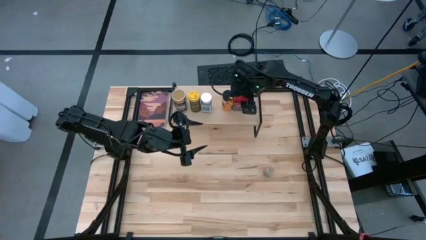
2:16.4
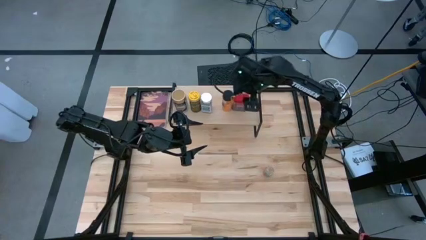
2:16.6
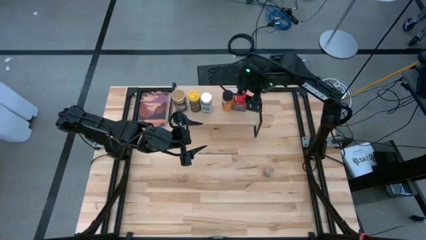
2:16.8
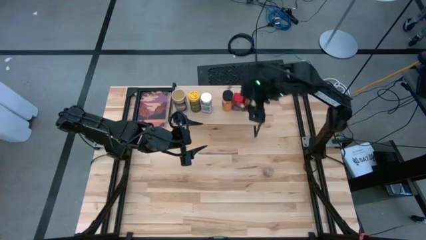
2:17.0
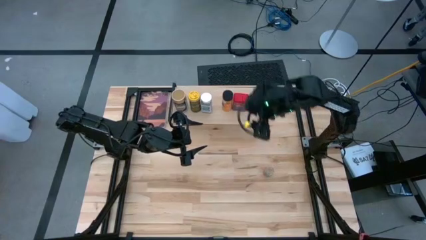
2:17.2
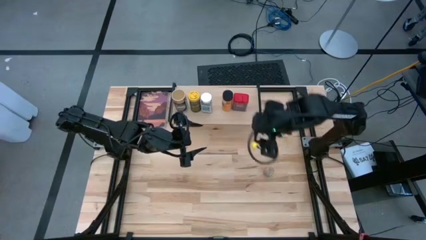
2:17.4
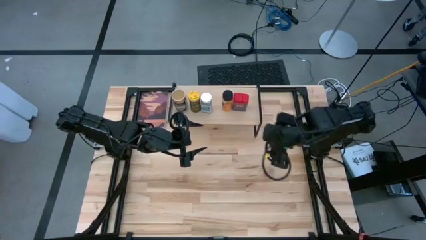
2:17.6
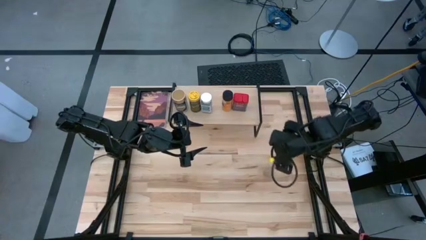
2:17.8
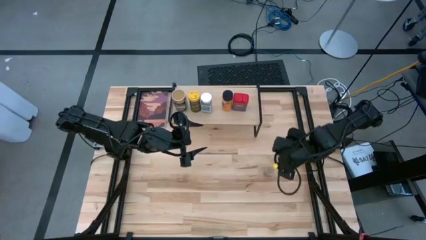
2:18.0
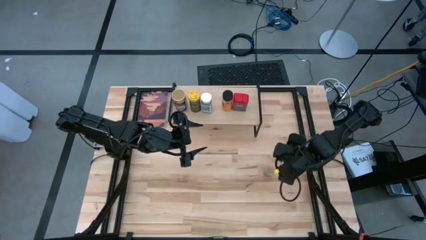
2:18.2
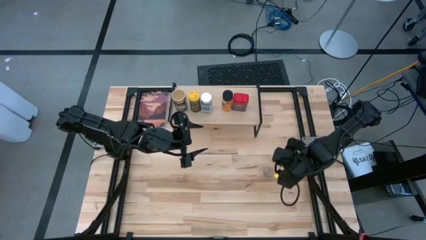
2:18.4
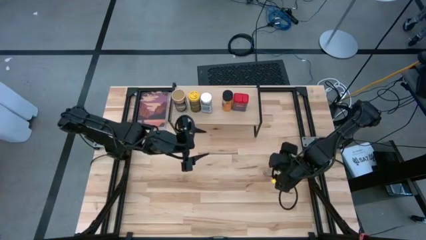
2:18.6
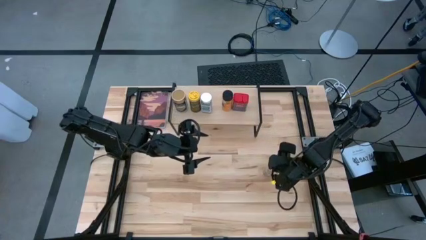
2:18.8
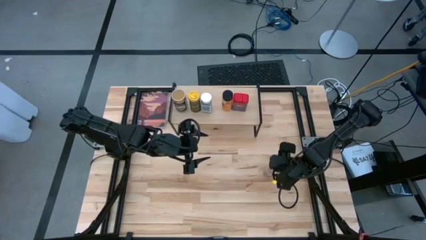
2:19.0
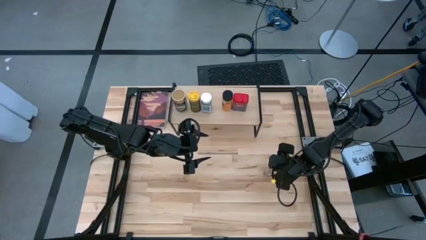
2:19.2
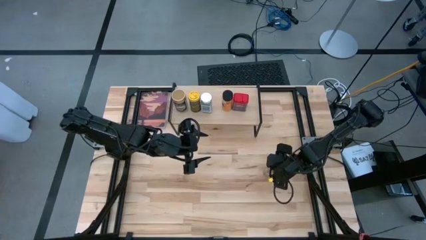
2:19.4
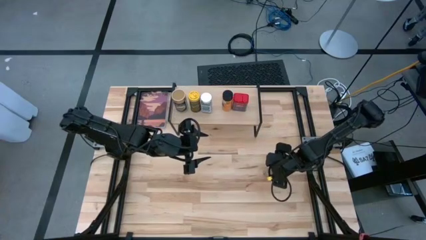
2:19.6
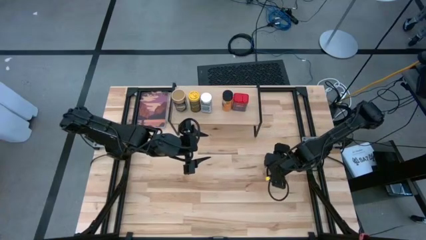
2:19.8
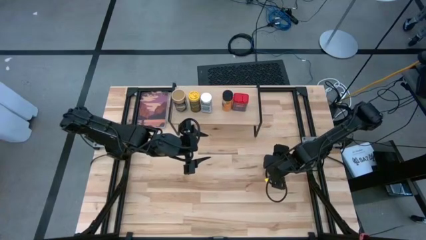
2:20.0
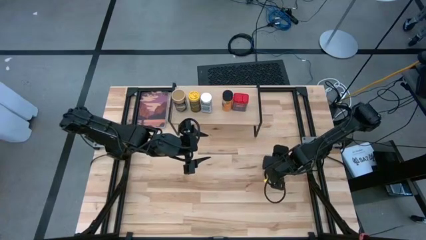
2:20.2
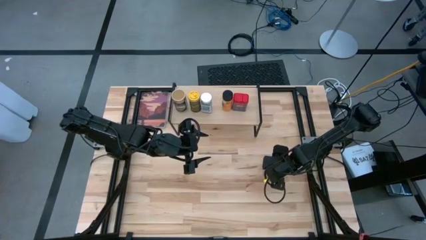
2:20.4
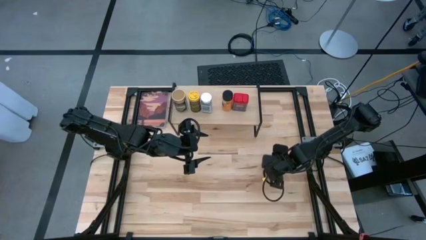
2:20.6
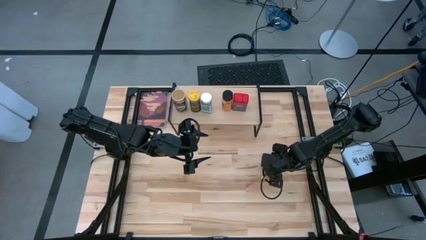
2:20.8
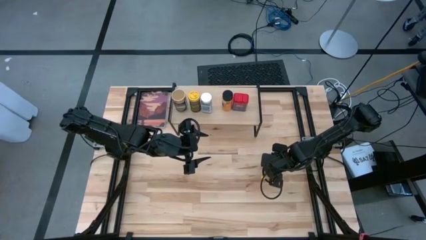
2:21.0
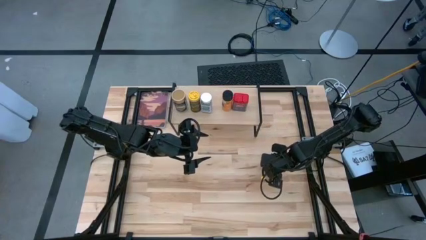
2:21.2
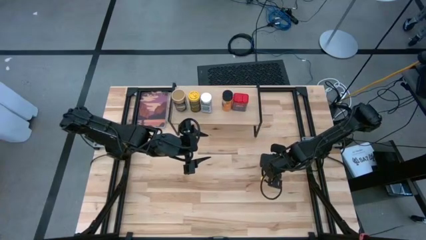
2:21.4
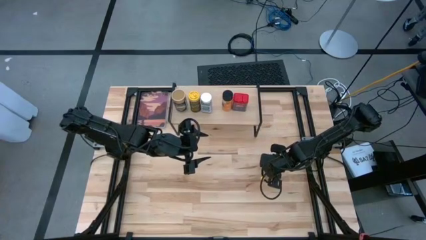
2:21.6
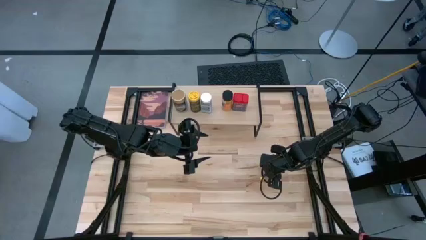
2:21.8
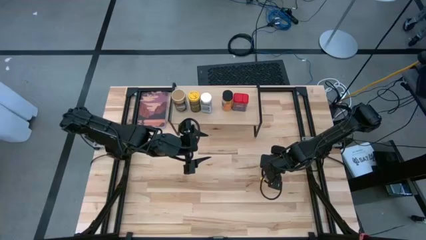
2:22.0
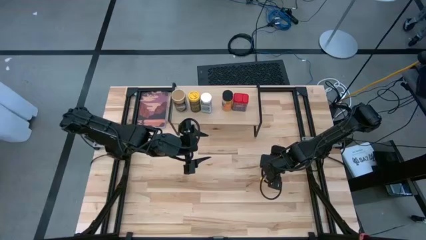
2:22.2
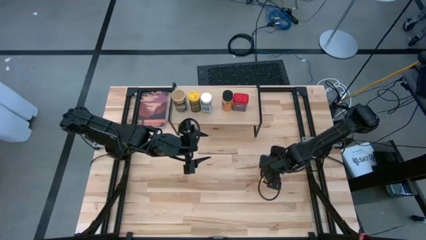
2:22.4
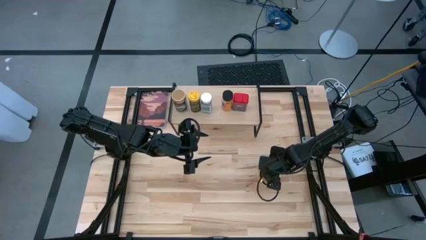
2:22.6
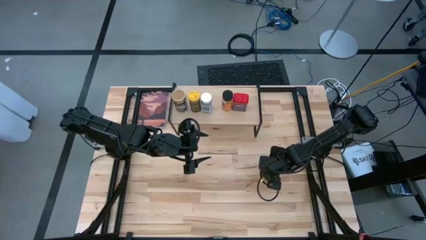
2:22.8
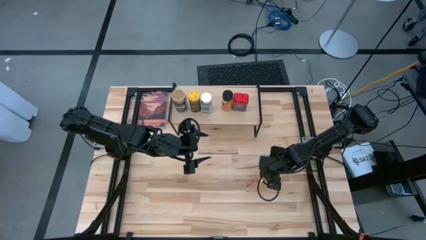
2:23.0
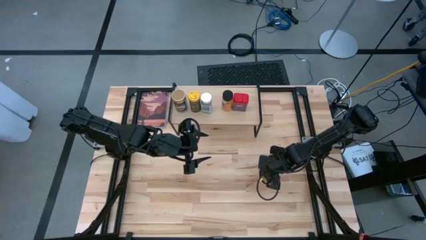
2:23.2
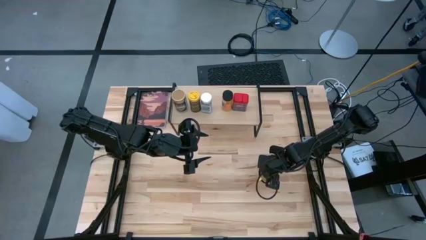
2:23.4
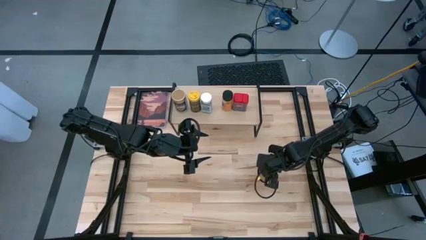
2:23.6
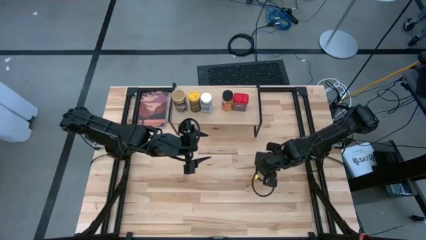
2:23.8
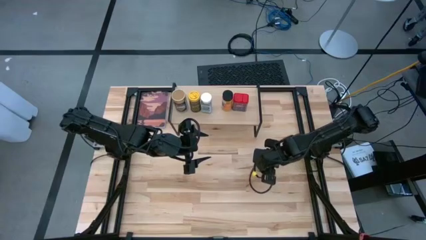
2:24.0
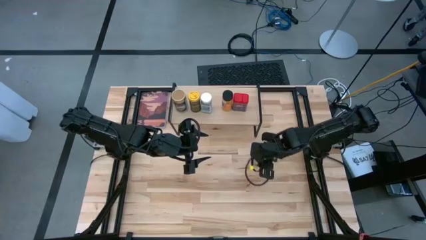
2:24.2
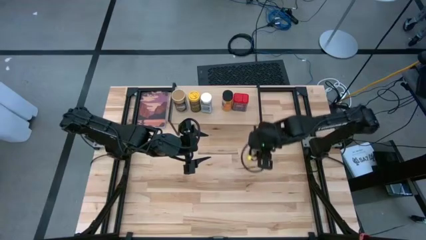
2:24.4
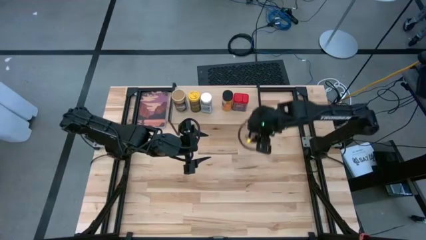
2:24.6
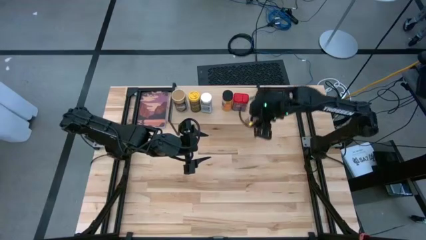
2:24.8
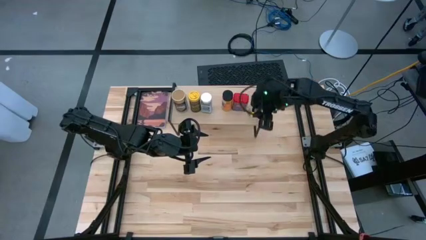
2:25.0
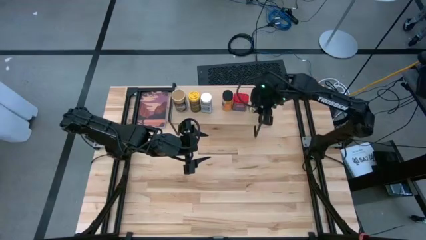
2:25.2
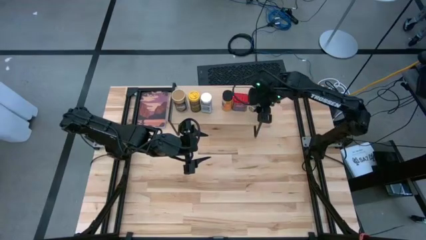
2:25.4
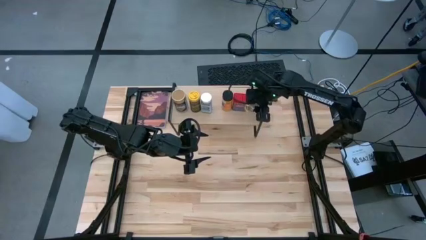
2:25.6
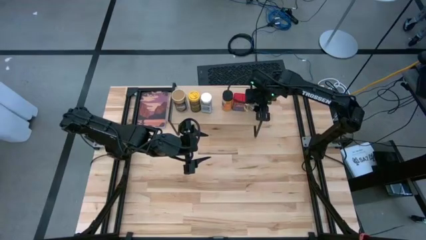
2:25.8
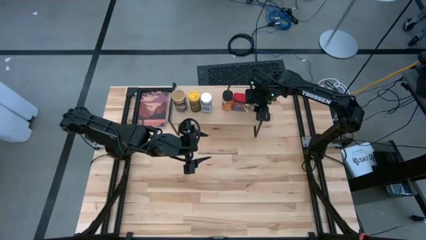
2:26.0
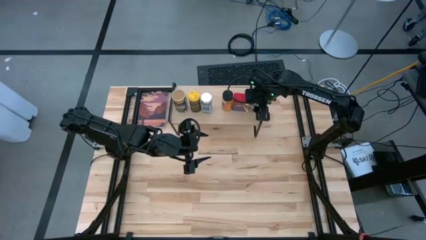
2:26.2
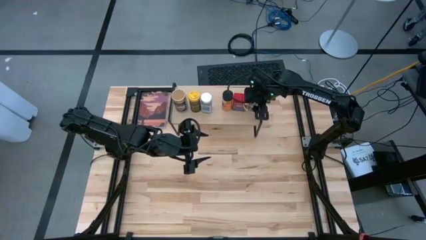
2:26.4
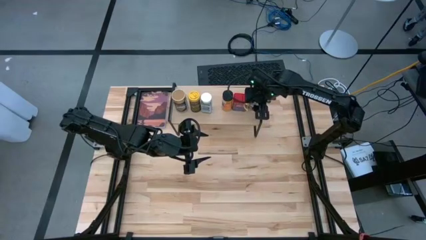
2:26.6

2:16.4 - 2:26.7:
Task: Shelf spices
Put the brown seasoning bottle on the shelf

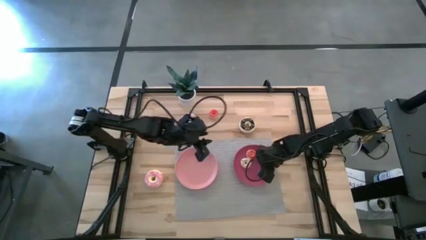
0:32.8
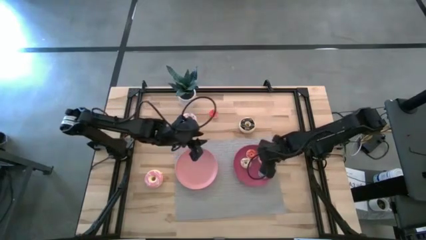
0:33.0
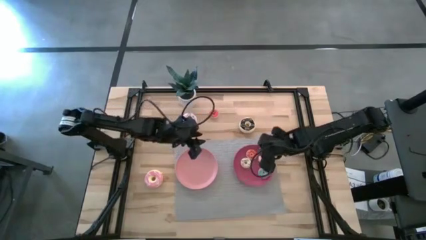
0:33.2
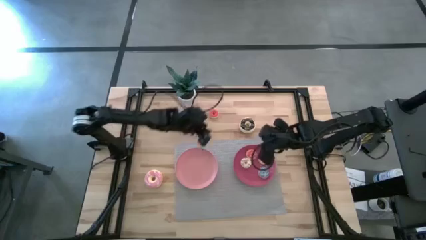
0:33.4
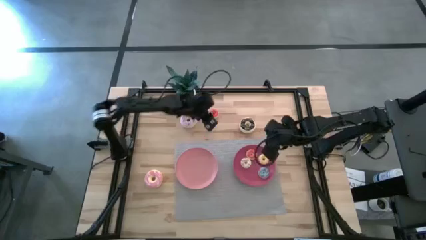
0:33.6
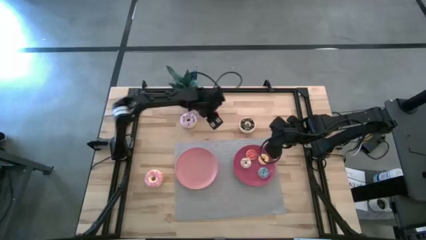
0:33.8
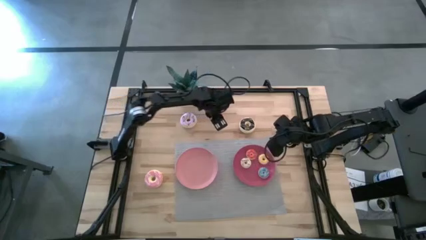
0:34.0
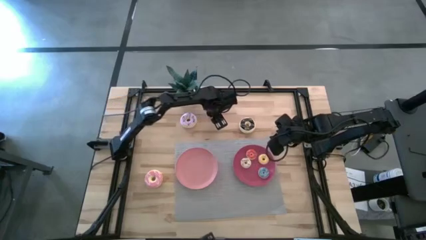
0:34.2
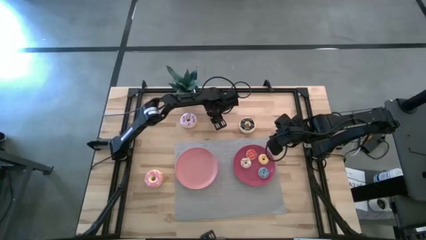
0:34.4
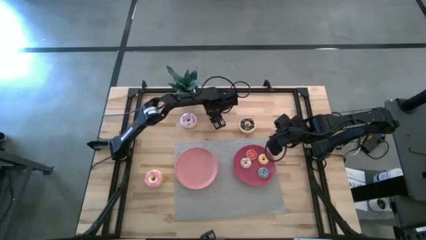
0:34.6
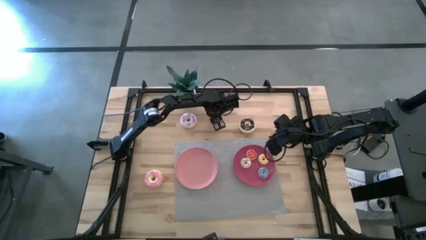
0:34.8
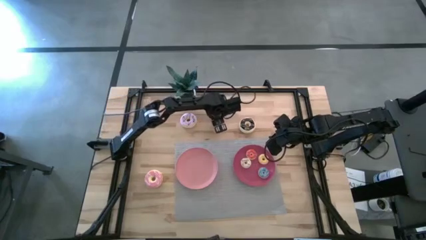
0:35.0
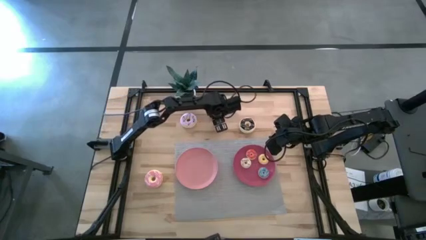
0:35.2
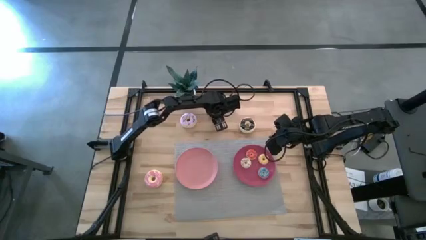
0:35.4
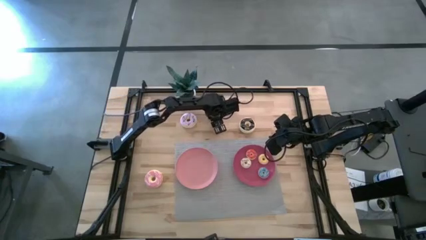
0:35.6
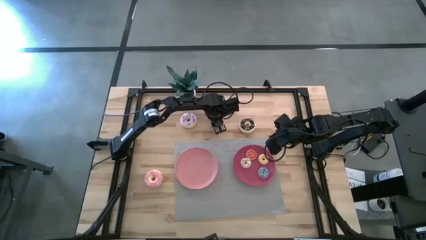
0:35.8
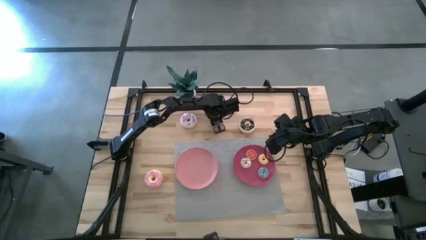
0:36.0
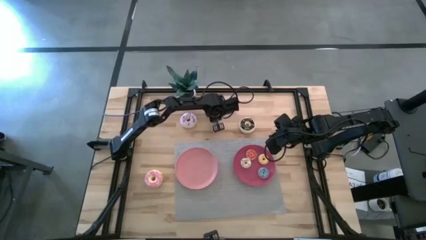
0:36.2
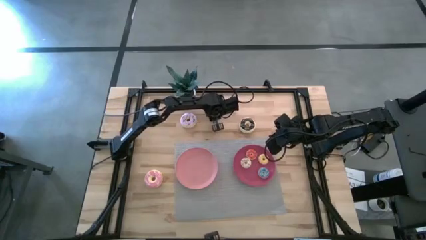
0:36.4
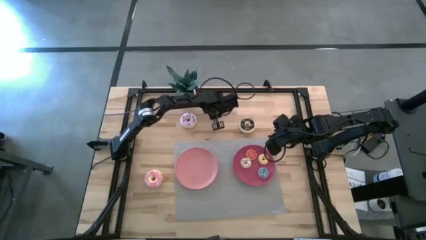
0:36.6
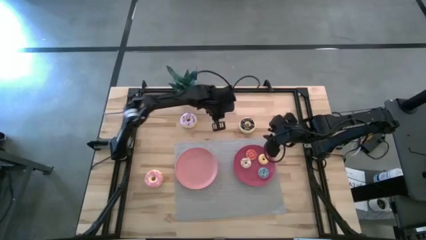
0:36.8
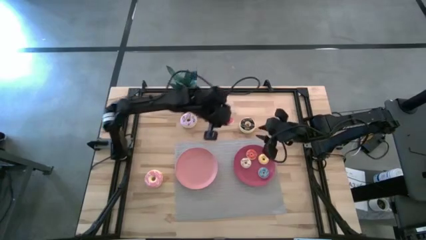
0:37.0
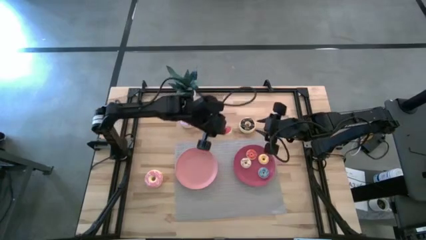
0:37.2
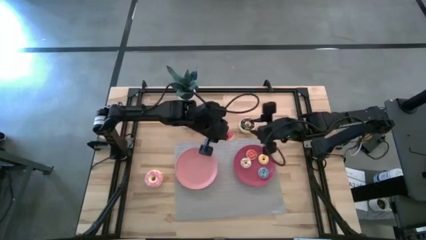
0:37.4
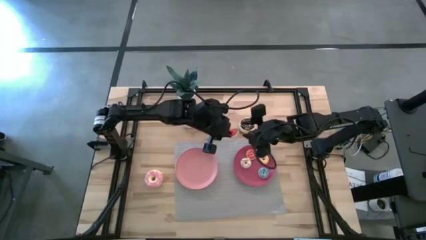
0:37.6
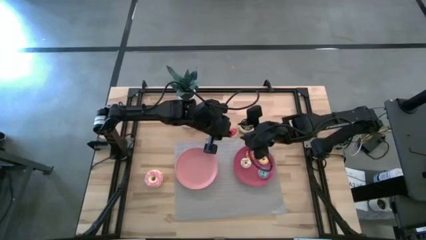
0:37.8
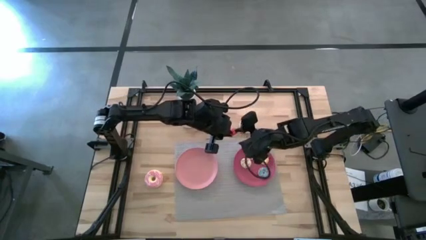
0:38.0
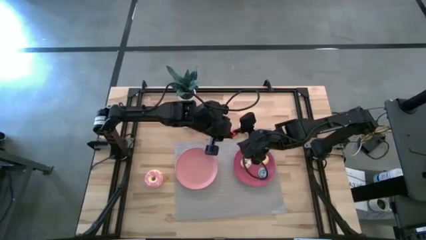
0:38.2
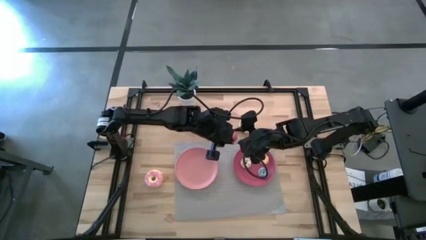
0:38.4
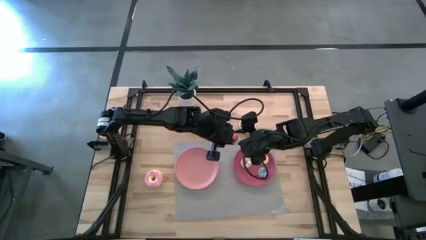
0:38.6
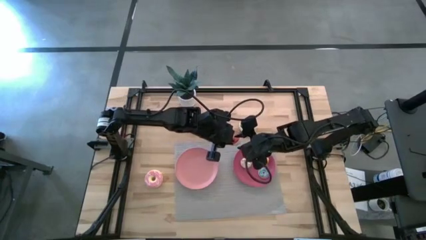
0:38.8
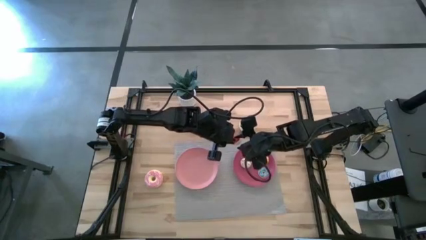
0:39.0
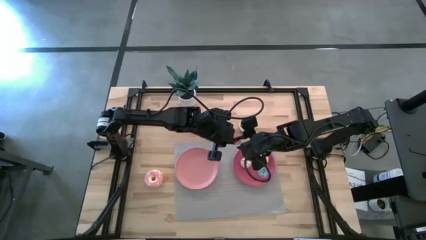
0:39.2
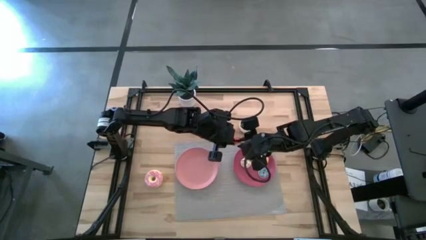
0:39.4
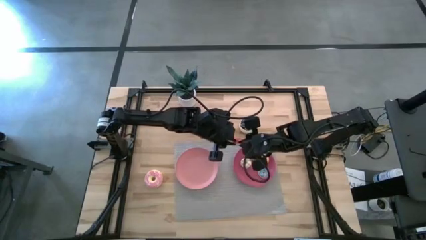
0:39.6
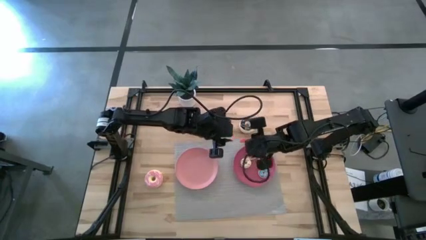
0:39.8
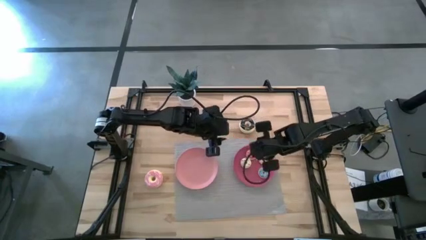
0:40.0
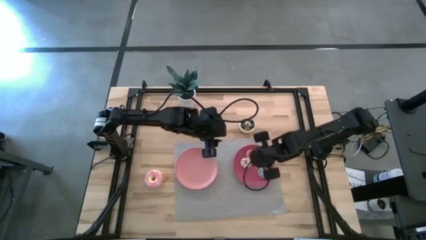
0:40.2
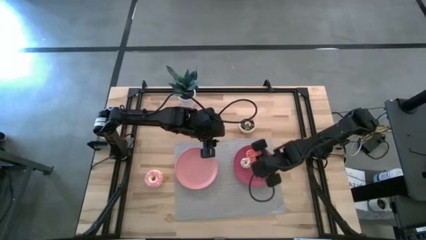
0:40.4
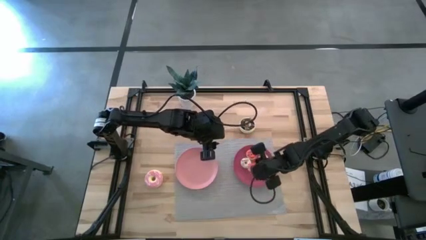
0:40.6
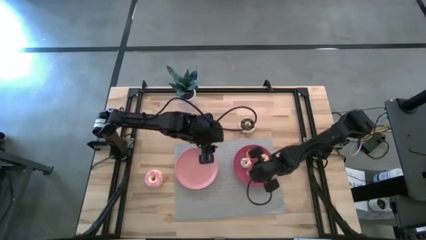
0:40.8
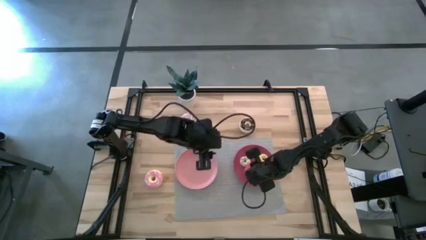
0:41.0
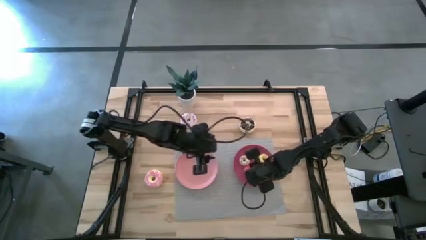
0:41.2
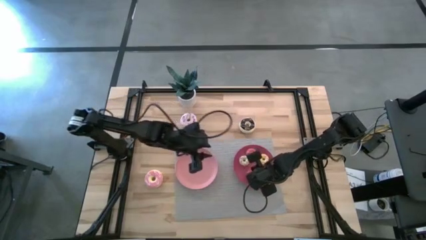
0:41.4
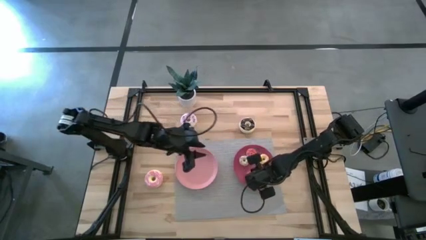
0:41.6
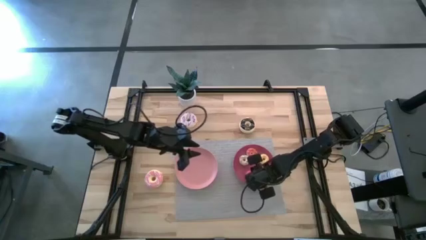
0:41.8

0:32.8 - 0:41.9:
Task: Pick & Place donuts
Put the small red donut on the dark pink plate
